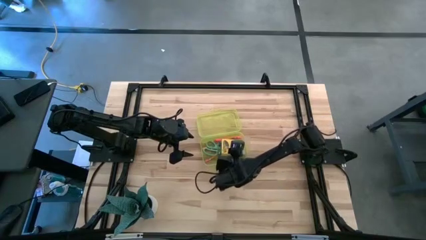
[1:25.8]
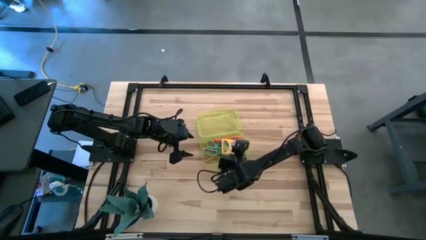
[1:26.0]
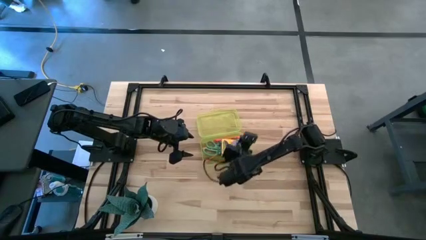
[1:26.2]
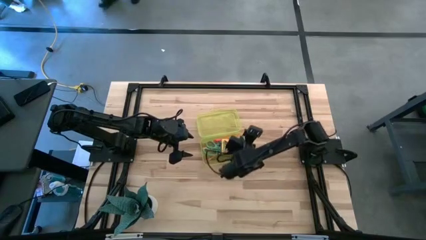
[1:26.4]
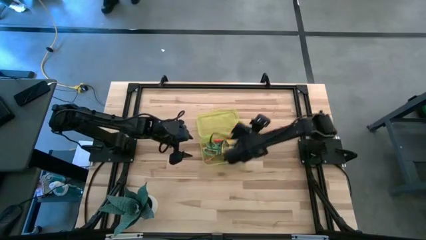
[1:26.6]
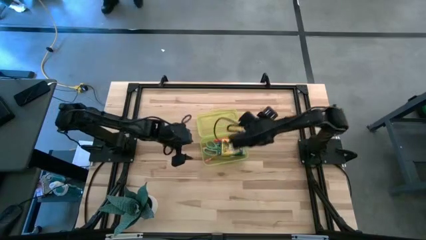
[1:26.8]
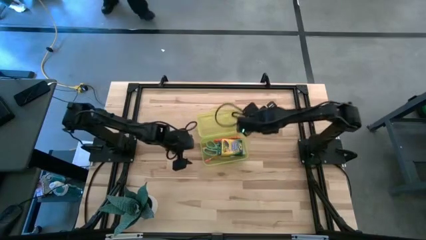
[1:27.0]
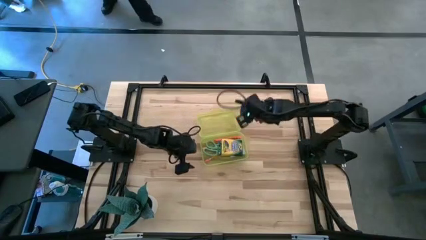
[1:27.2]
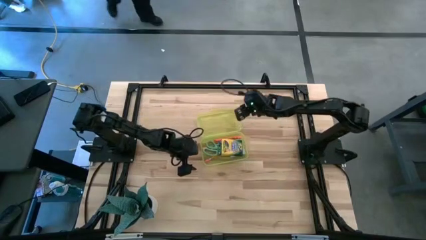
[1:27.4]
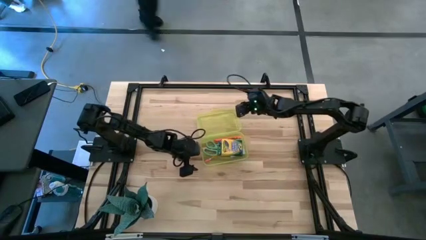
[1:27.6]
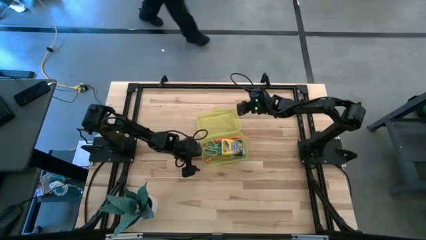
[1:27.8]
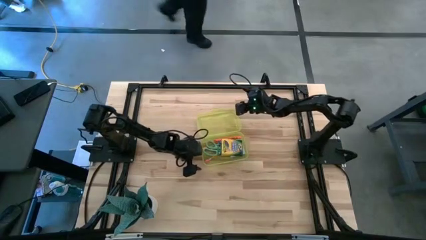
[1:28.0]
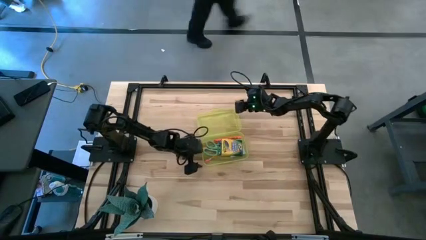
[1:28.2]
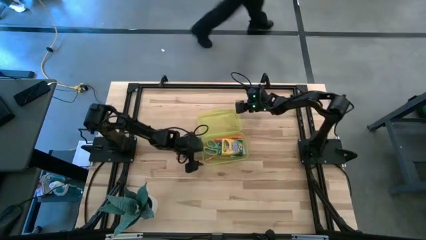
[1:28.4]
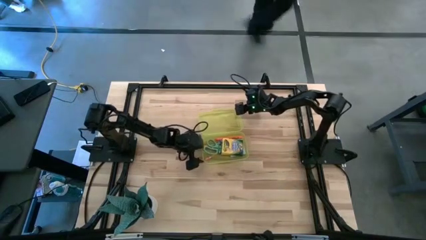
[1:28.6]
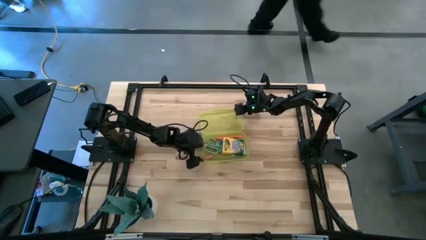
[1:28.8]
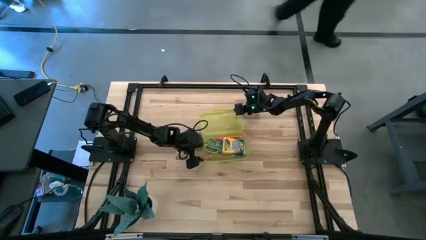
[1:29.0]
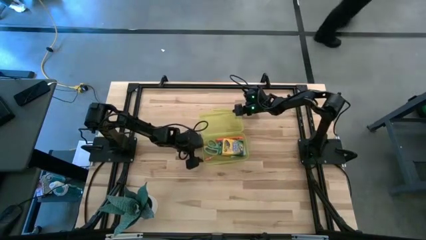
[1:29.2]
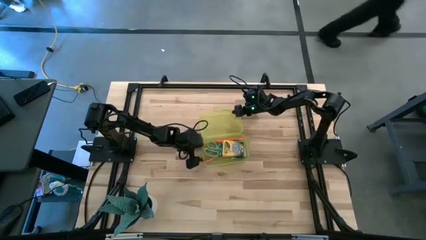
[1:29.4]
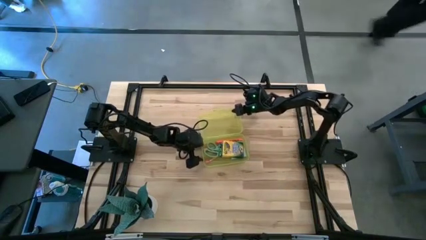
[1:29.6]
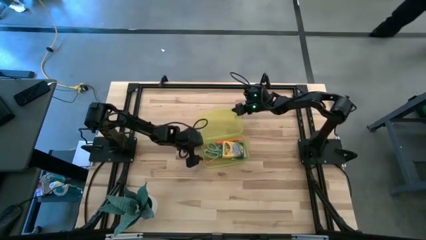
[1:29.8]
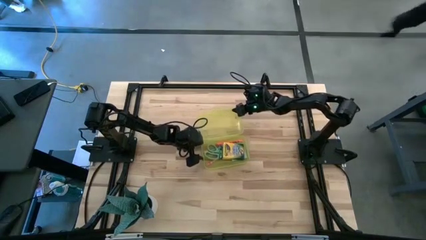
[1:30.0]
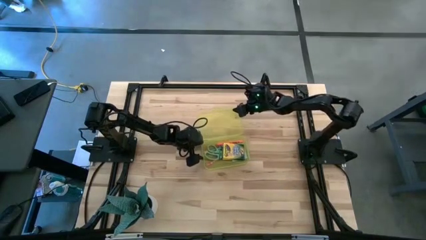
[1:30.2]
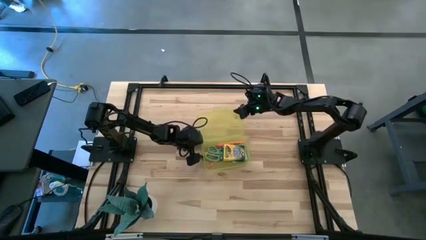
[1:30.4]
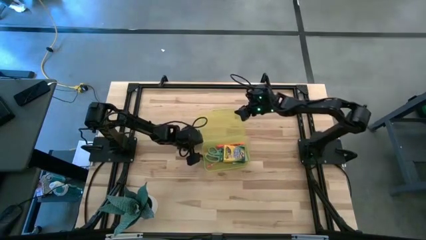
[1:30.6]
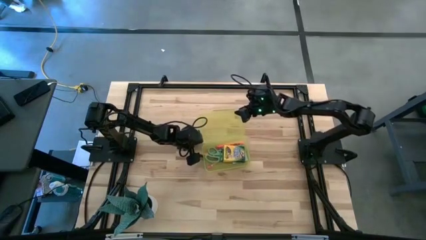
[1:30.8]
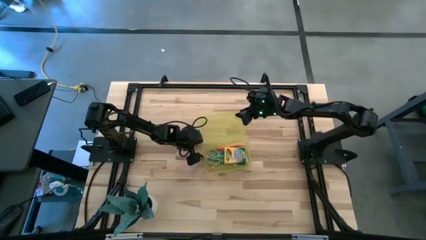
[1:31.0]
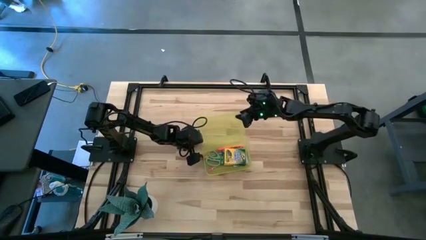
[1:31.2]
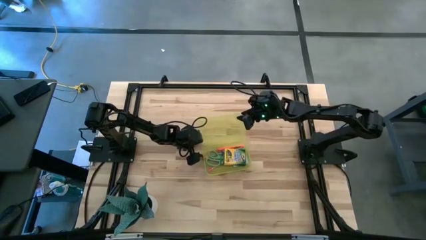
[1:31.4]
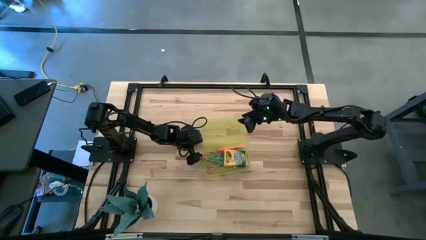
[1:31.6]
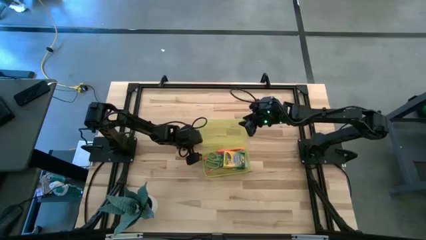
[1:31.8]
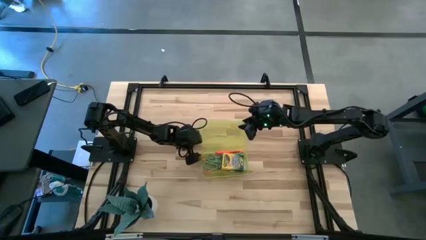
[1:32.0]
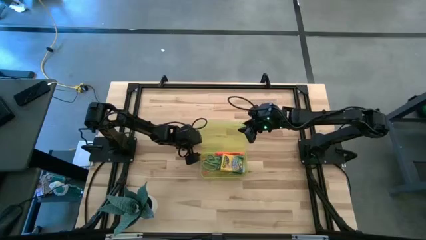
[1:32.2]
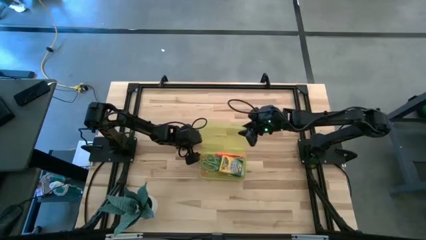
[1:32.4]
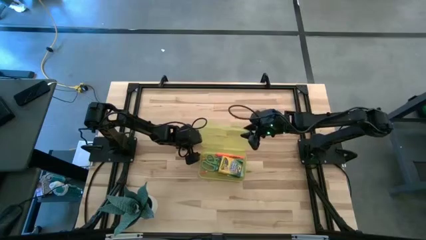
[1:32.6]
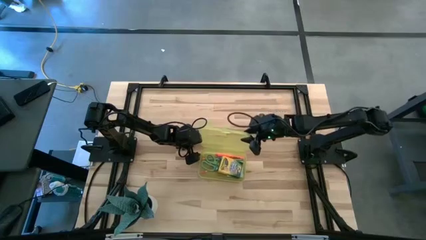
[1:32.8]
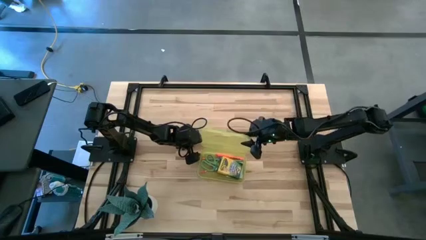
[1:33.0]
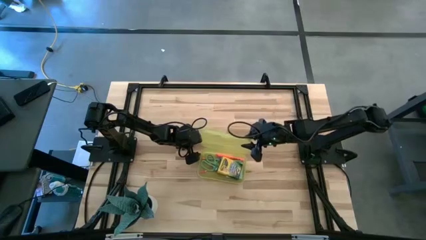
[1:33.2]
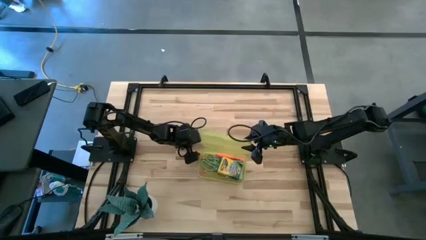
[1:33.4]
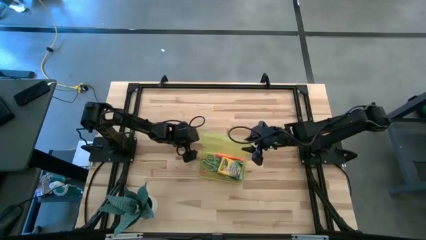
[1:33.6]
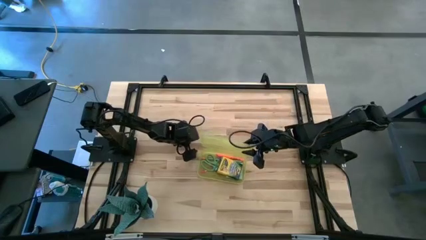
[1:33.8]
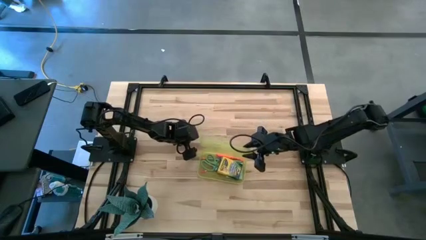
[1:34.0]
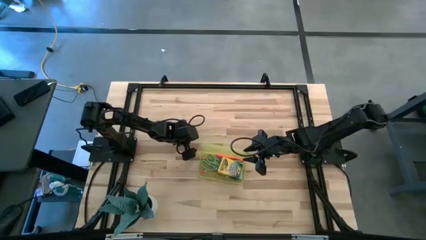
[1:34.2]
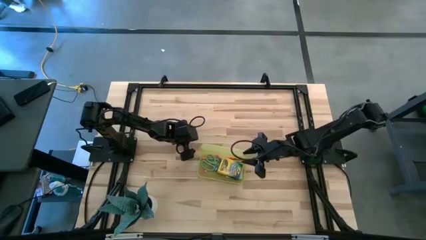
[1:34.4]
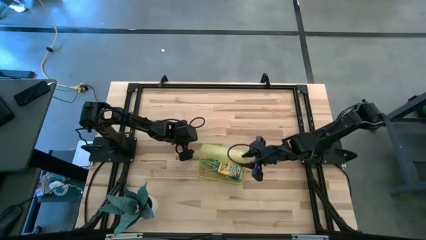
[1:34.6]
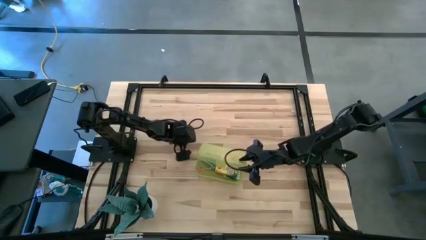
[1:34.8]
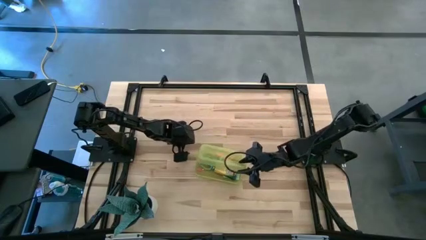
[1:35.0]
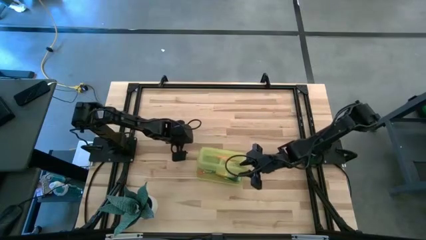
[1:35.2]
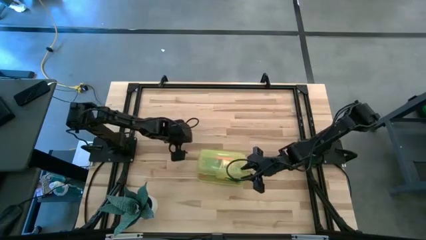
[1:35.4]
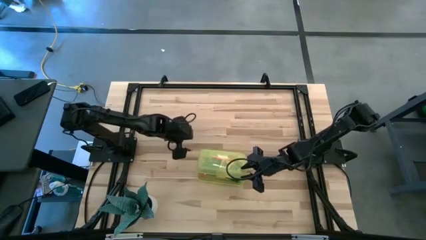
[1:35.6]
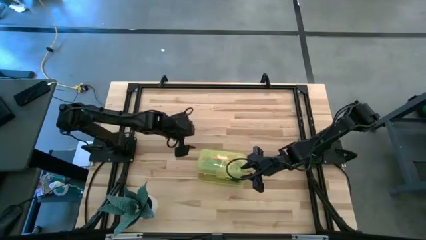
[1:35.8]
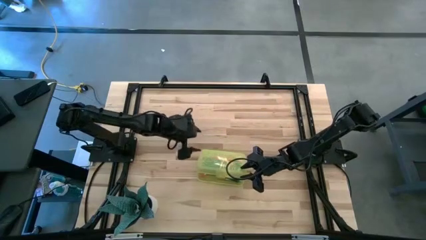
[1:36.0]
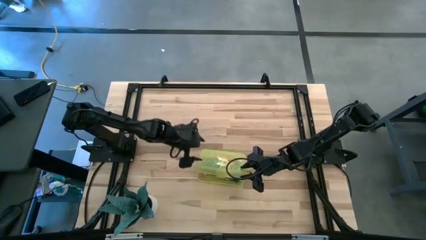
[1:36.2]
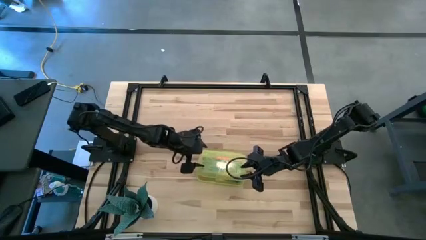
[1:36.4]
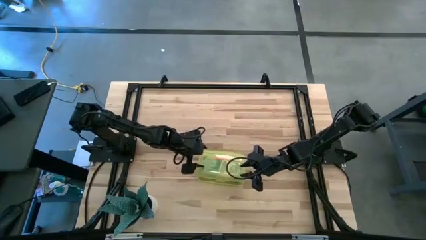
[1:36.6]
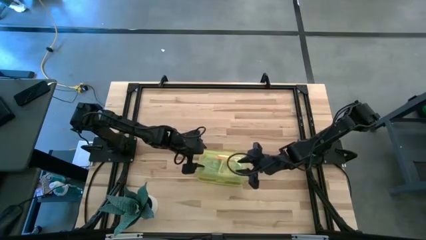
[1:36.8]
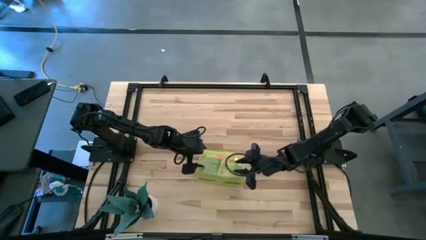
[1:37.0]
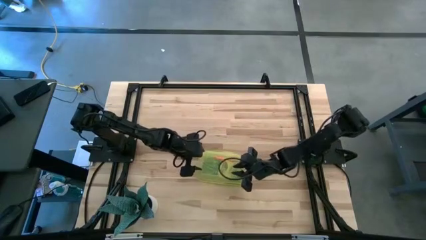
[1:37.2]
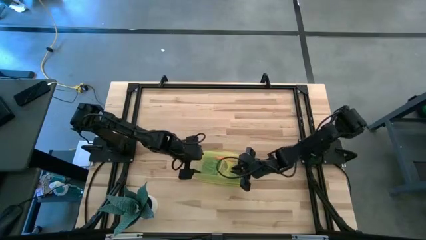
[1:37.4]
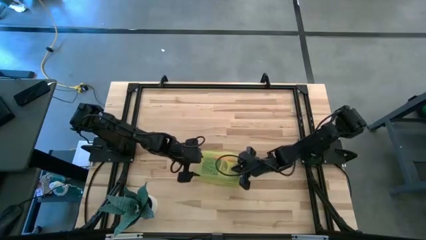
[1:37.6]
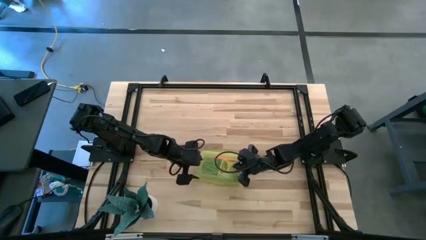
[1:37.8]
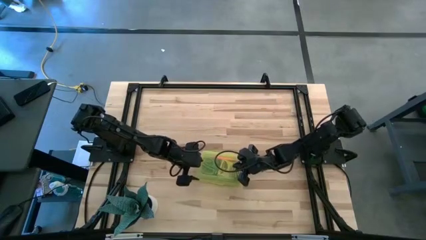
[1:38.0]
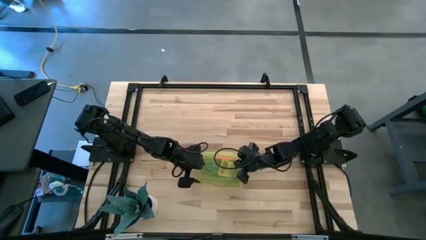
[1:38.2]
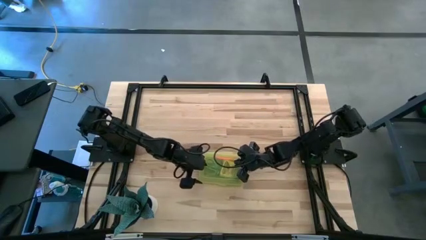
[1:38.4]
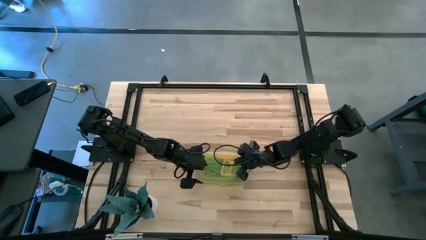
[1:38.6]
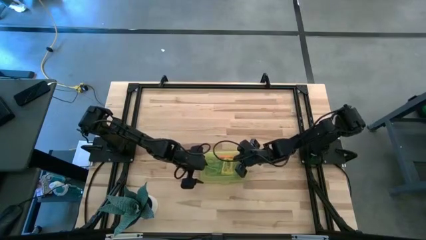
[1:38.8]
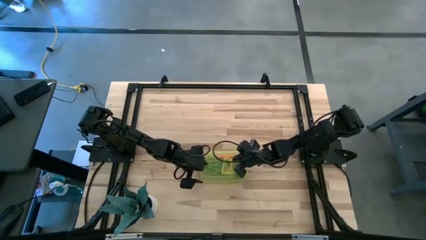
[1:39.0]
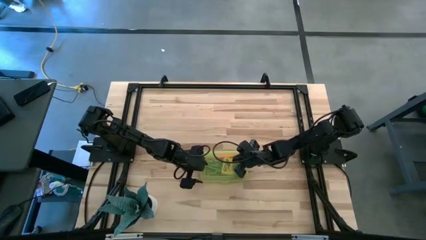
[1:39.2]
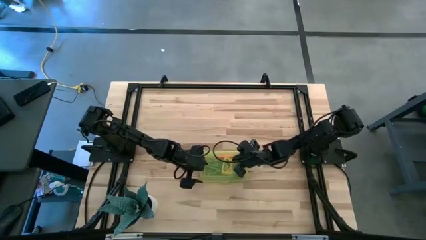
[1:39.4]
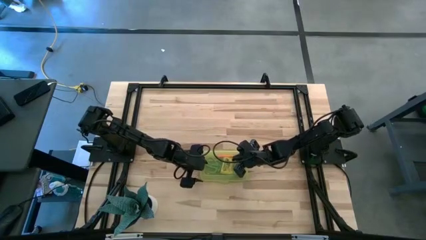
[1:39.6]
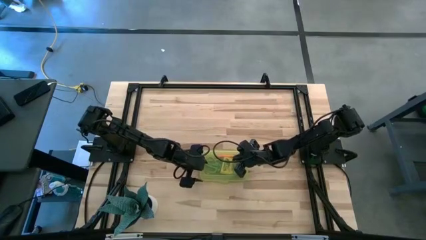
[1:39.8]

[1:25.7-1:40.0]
Task: Pack school essentials
Close the yellow storage box

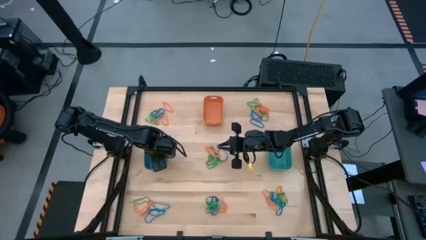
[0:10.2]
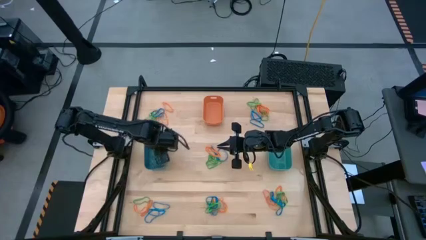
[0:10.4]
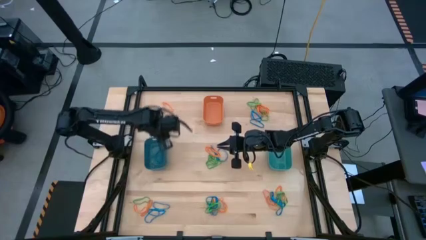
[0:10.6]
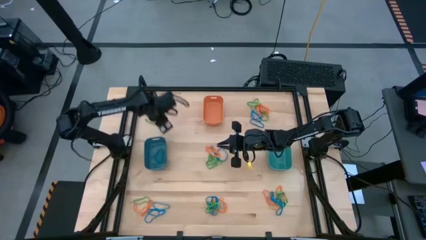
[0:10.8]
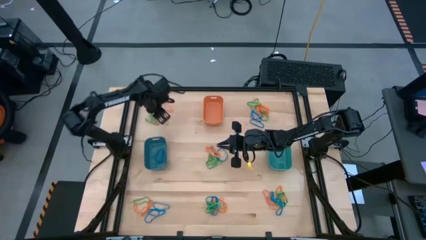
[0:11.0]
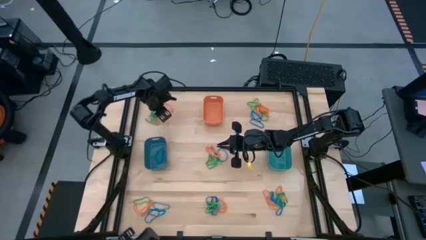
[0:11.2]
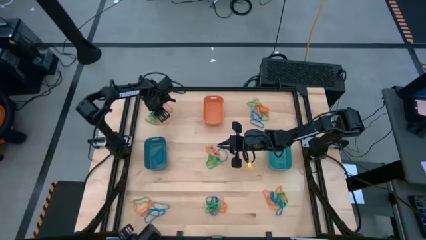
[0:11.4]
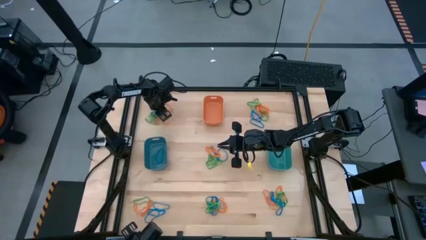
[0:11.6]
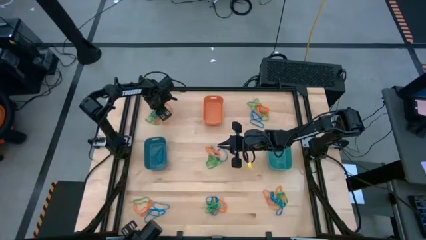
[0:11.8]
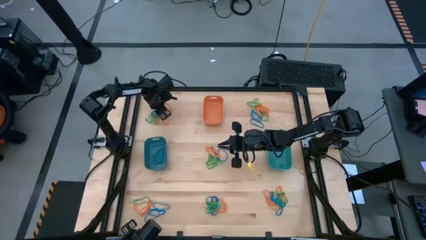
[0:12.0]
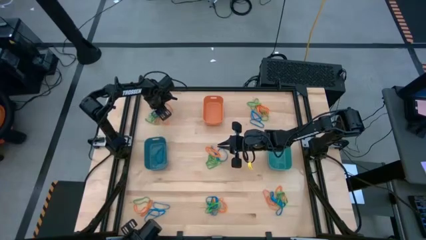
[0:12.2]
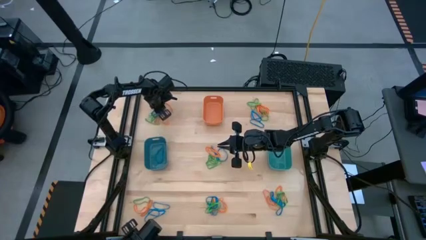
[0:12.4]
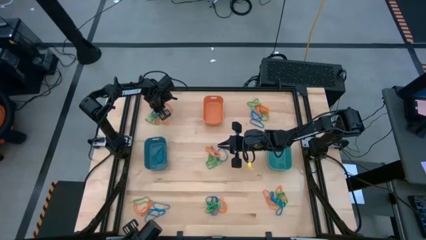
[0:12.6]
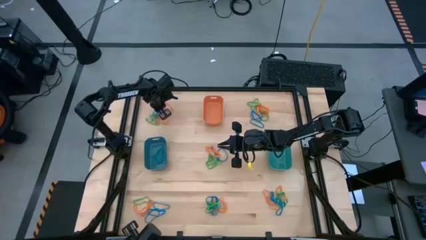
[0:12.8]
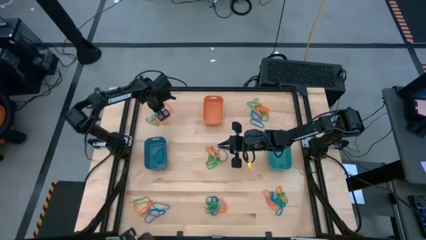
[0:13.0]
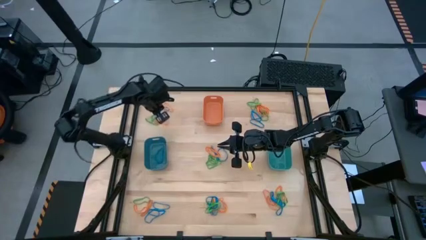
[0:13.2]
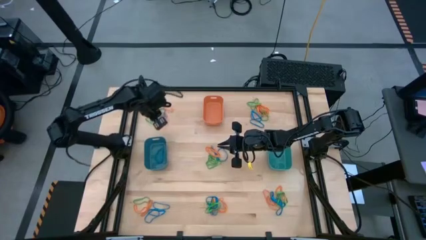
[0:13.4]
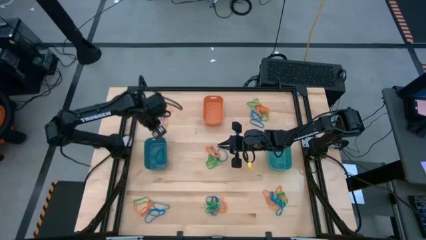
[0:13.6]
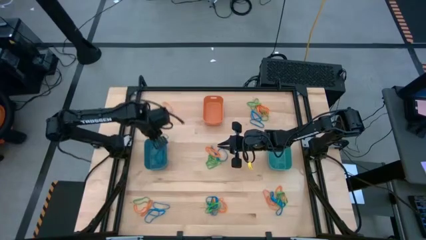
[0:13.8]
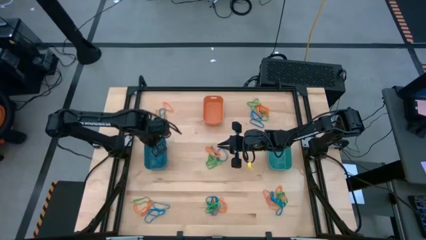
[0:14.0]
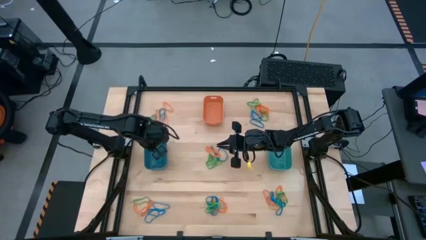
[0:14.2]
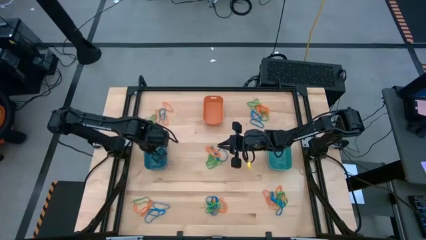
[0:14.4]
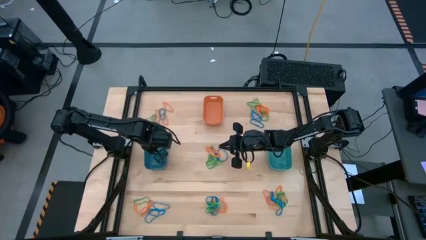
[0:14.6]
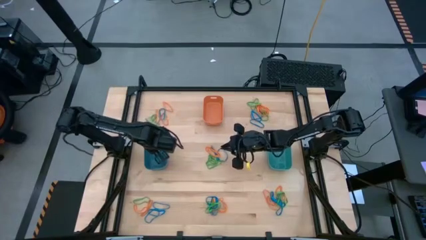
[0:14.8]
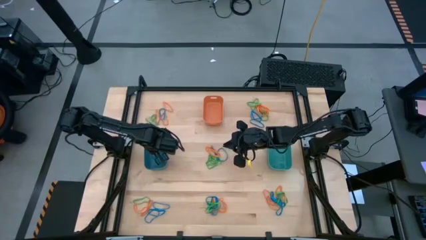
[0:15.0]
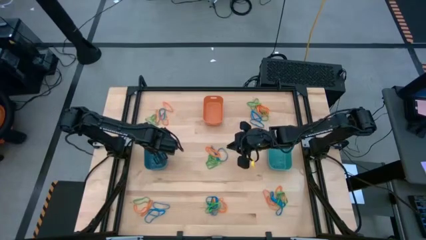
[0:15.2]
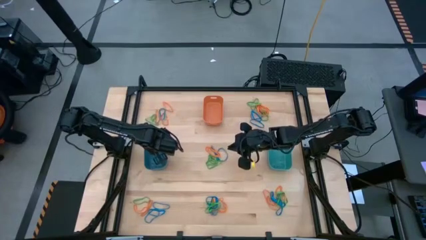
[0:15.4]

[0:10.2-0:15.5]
Task: Sort rubber bands into baskets
Put the blue rubber band into the blue bin
